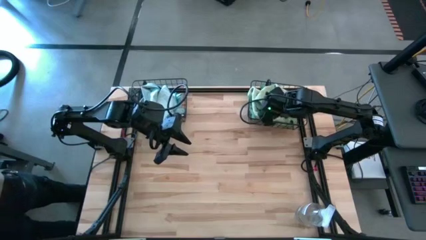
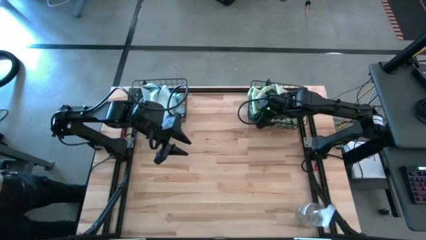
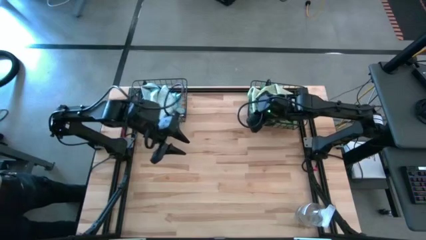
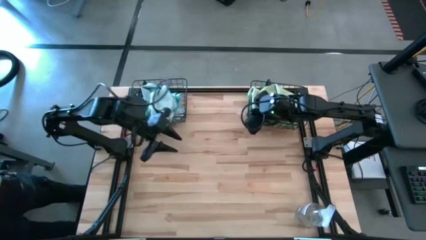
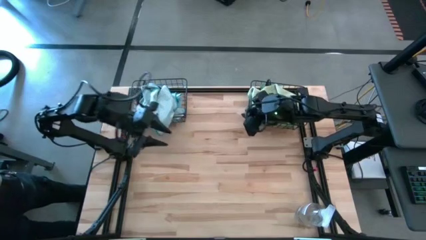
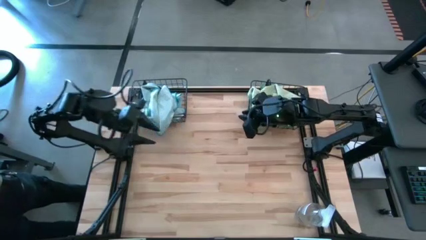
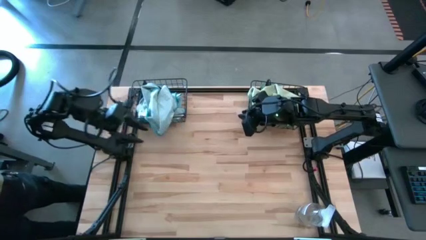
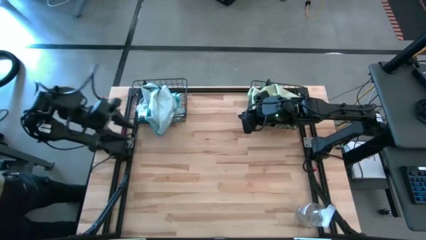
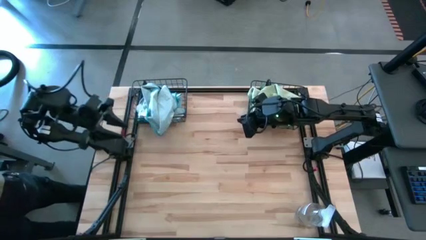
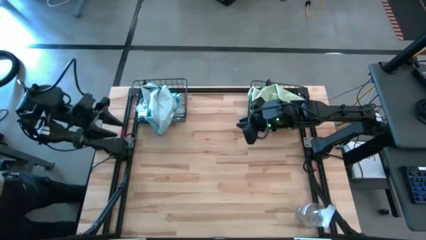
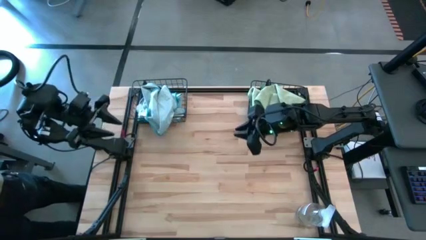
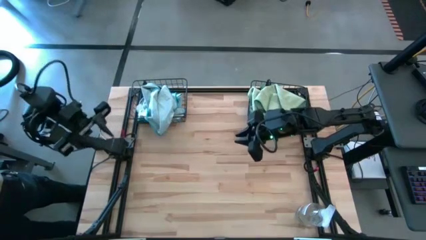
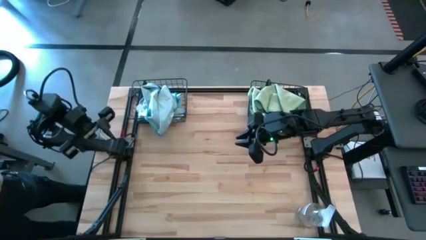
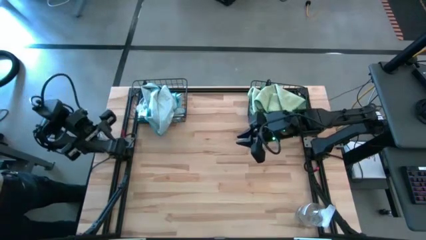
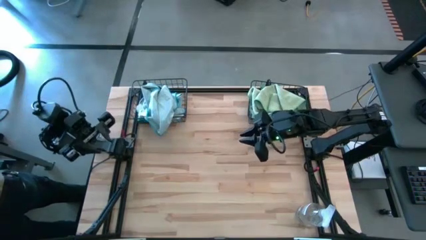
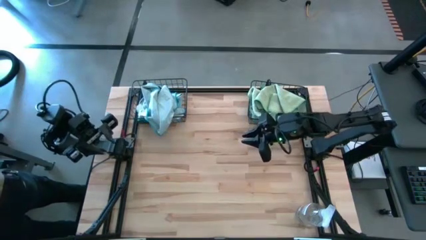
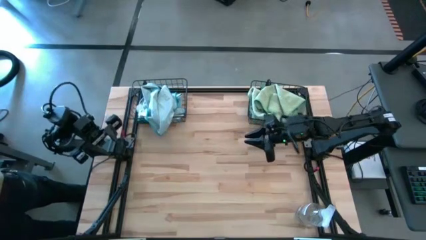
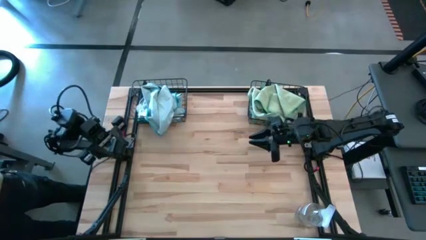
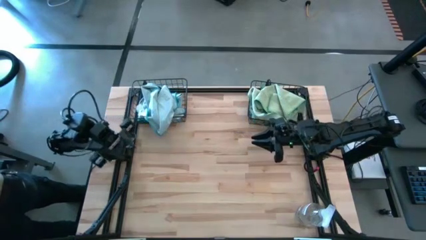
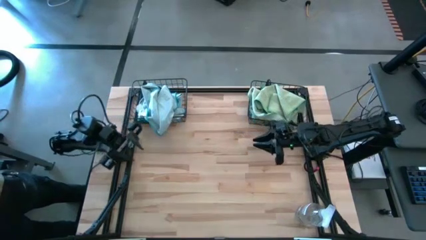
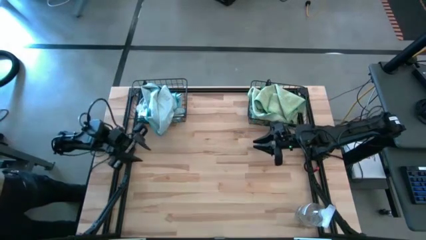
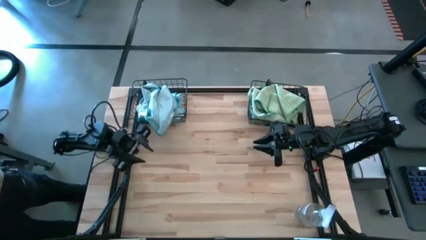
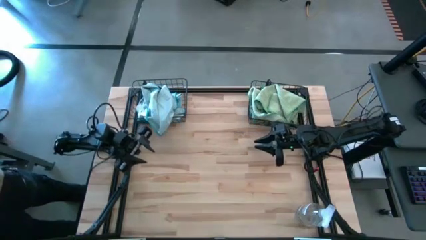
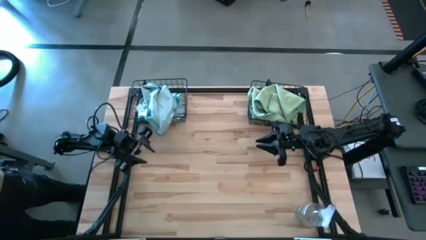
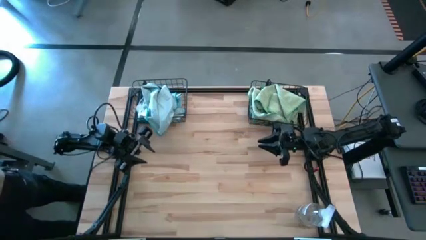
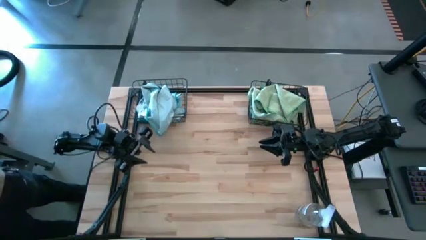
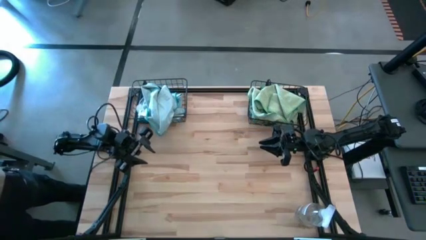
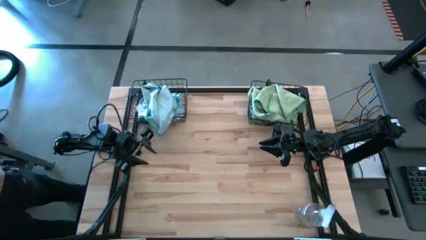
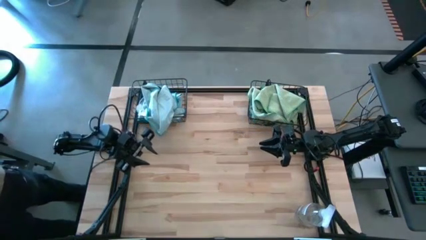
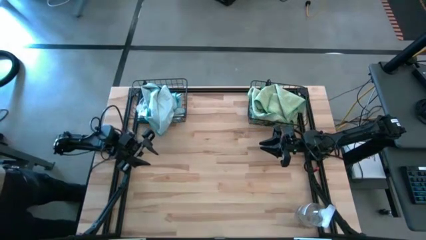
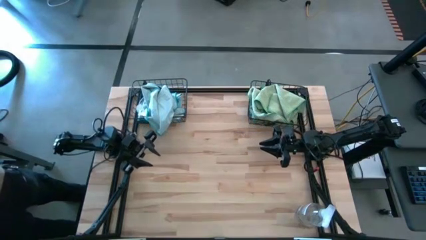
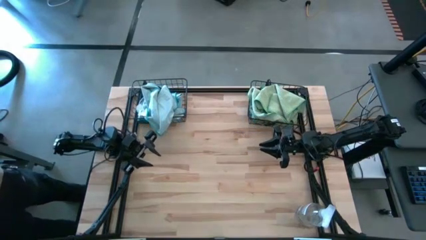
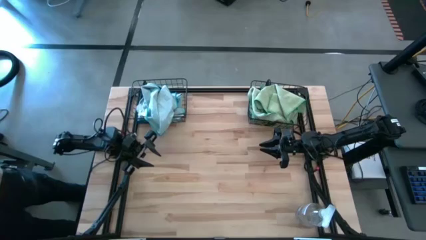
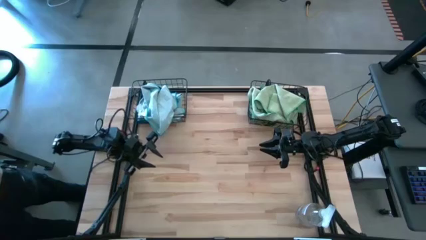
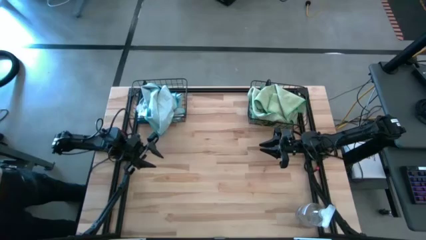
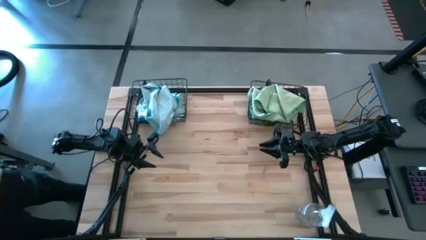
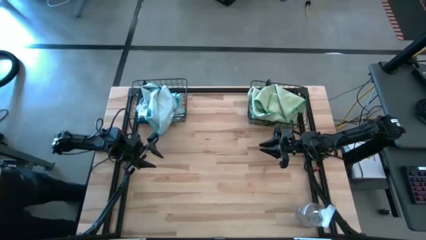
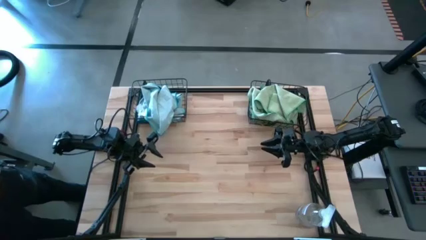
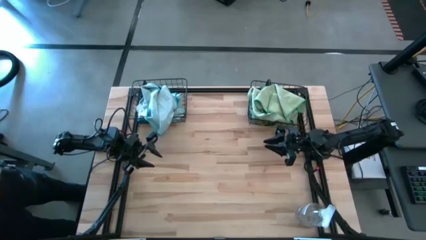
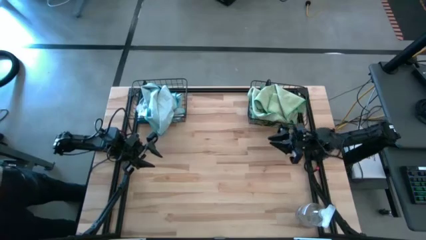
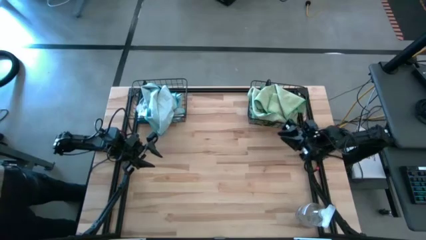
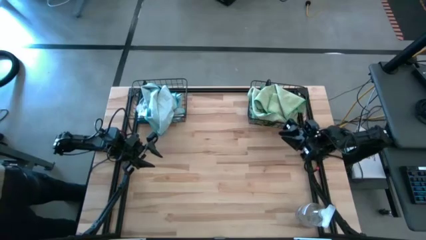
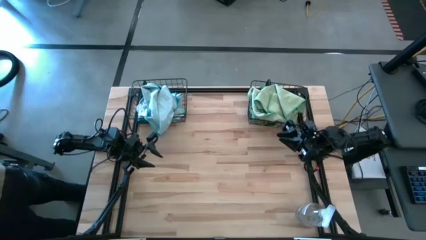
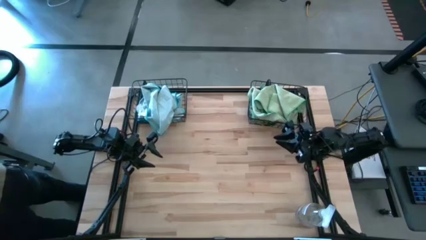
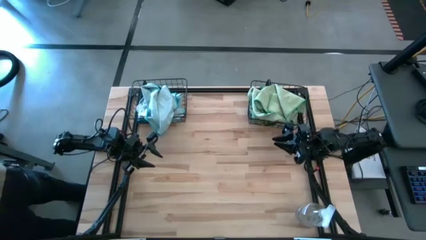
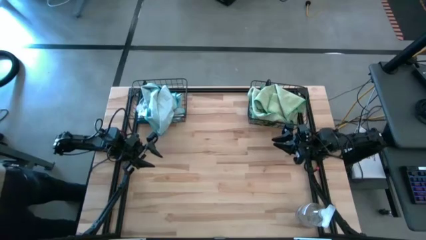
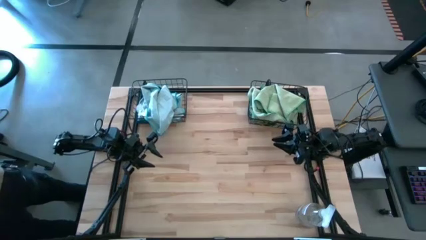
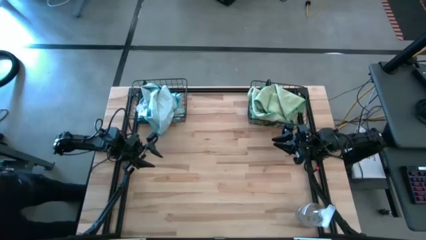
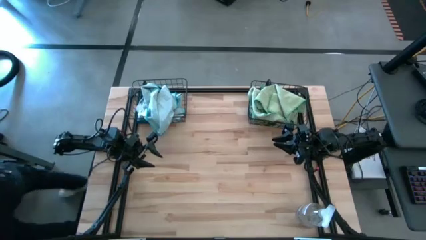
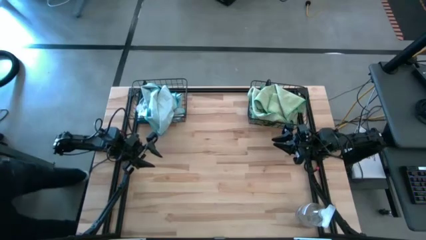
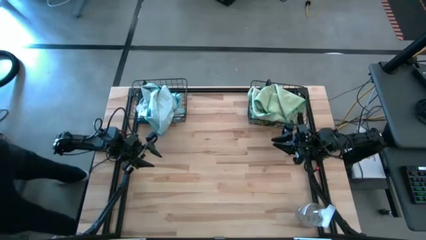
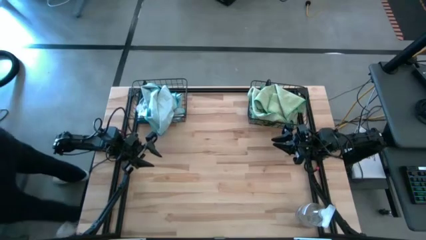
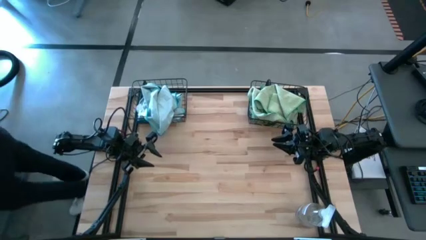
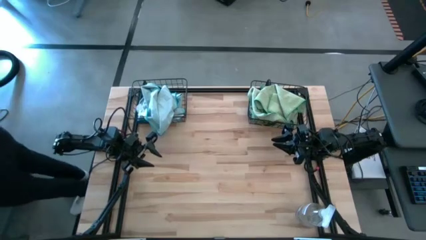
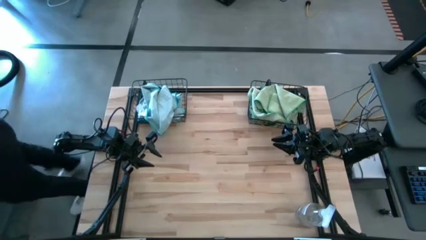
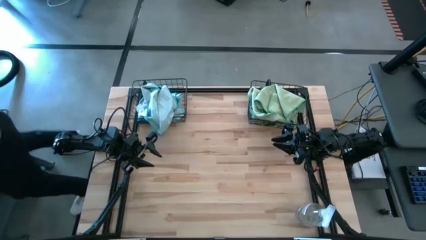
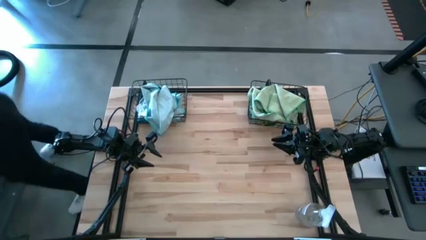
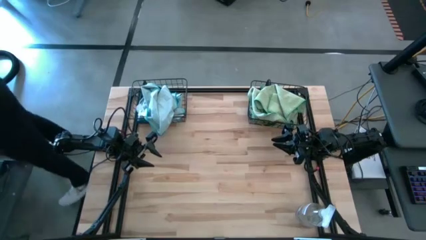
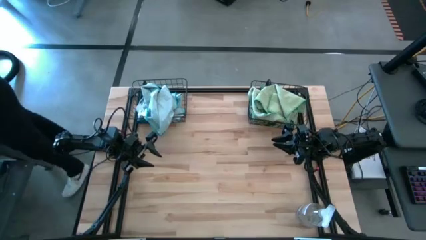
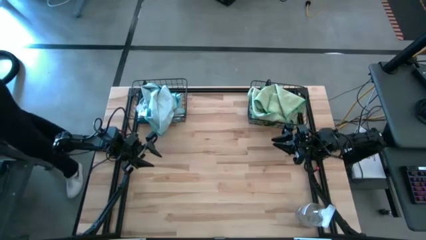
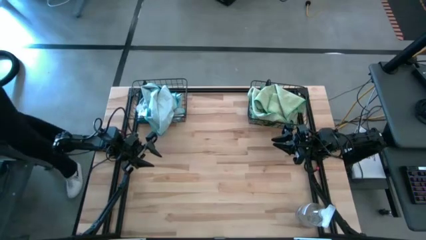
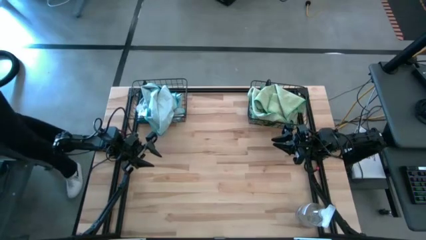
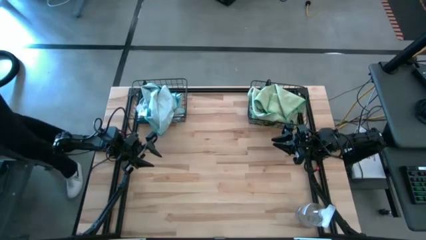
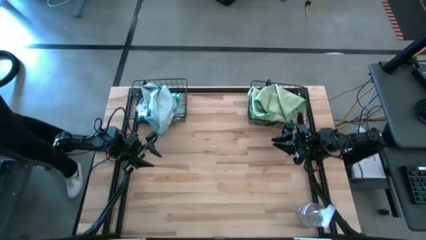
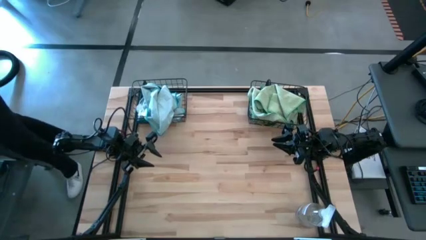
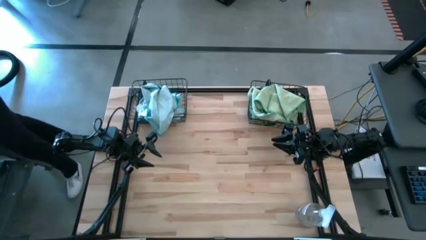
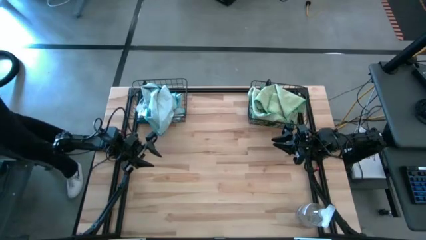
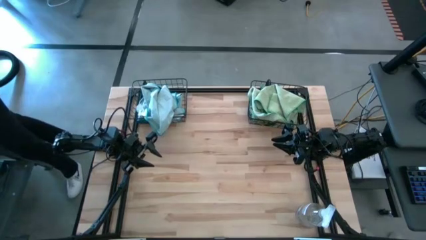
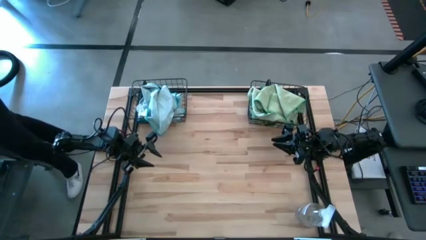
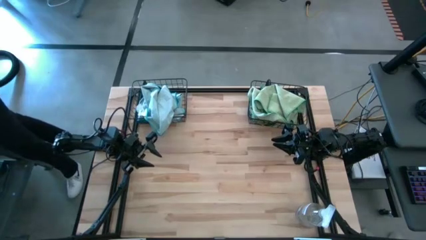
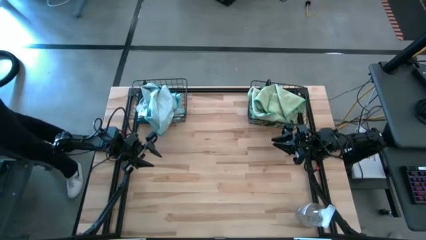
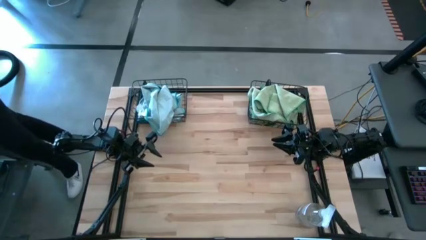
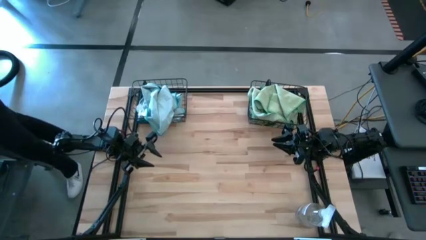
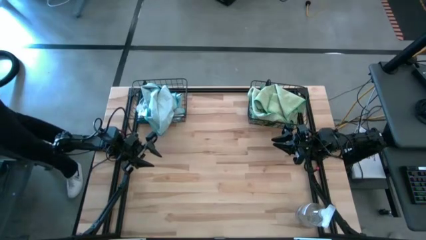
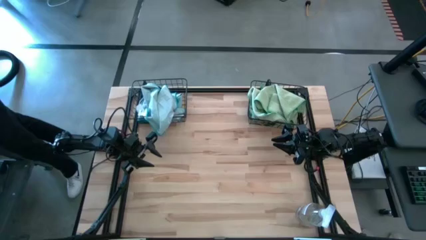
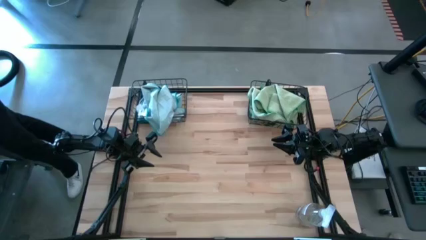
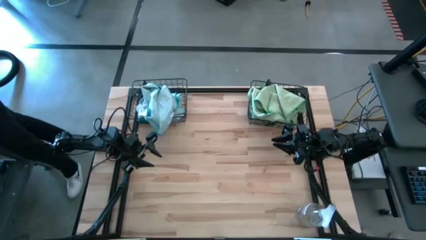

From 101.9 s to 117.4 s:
Task: Sort microfiber towel by color & place in baskets
Return to Home Position
